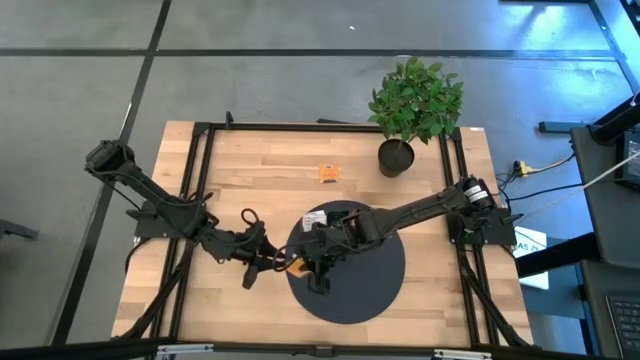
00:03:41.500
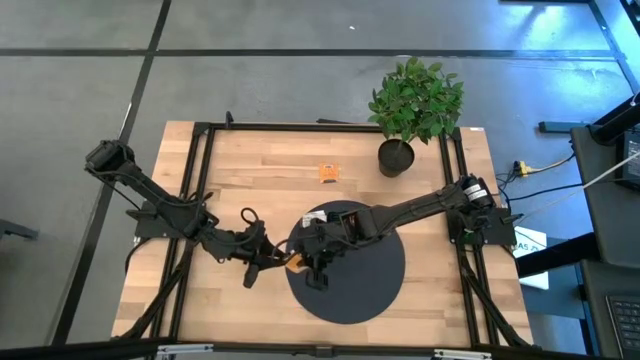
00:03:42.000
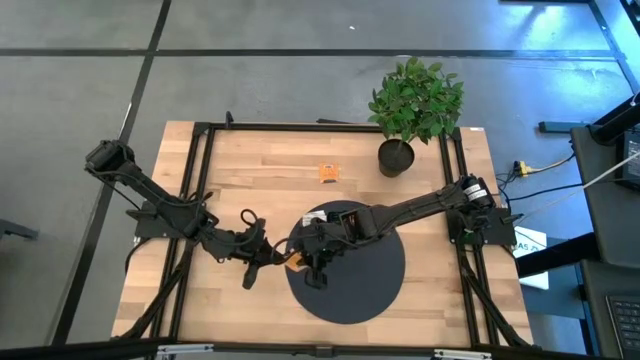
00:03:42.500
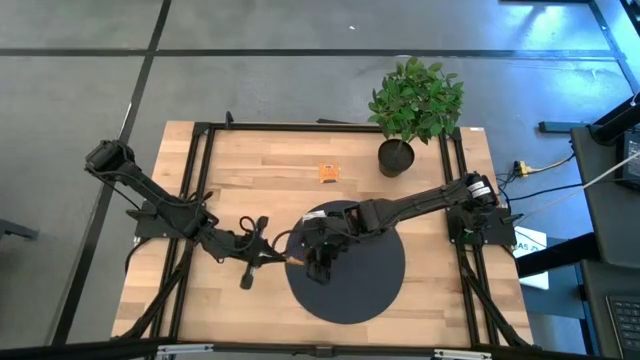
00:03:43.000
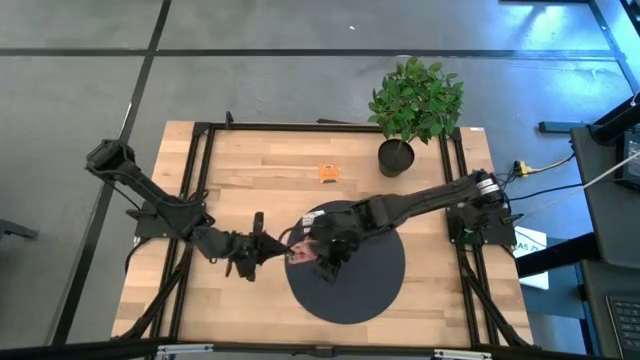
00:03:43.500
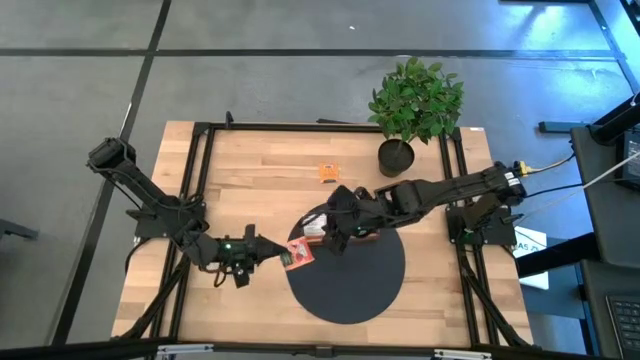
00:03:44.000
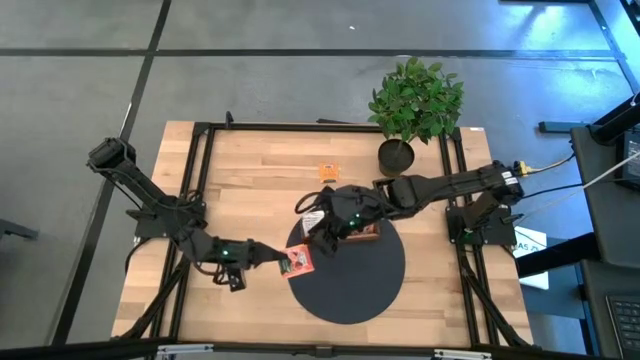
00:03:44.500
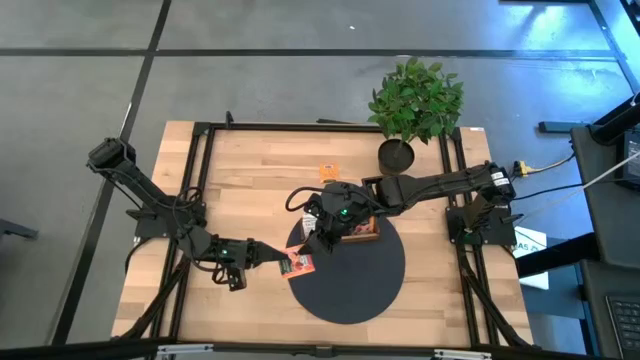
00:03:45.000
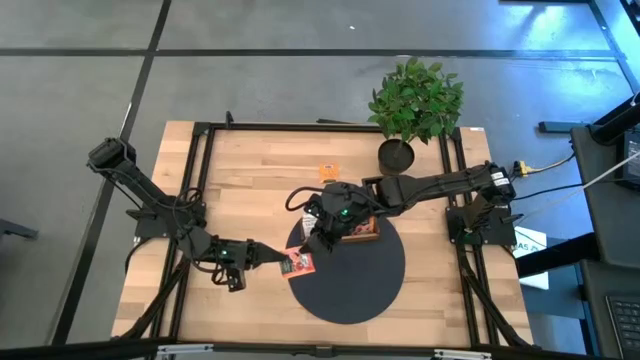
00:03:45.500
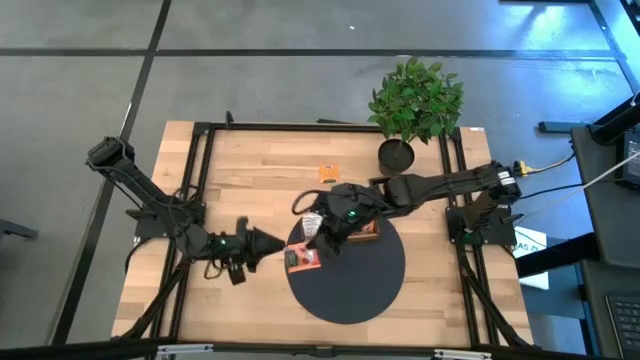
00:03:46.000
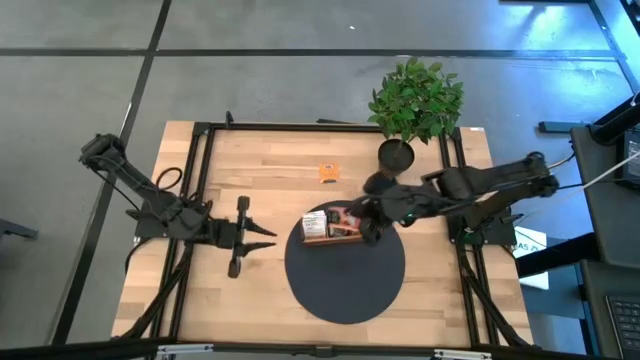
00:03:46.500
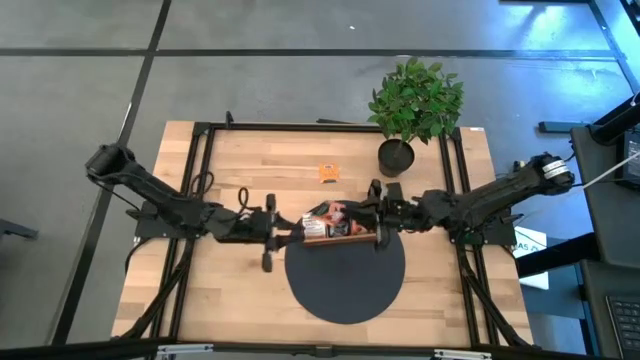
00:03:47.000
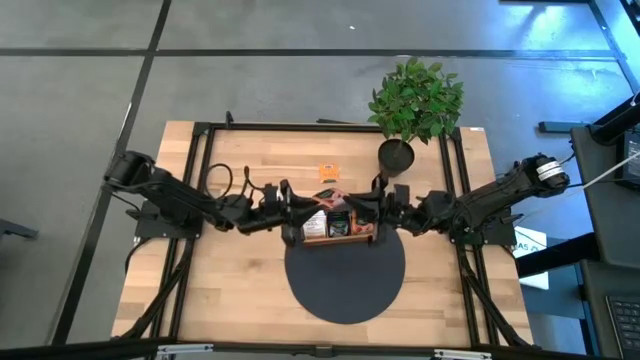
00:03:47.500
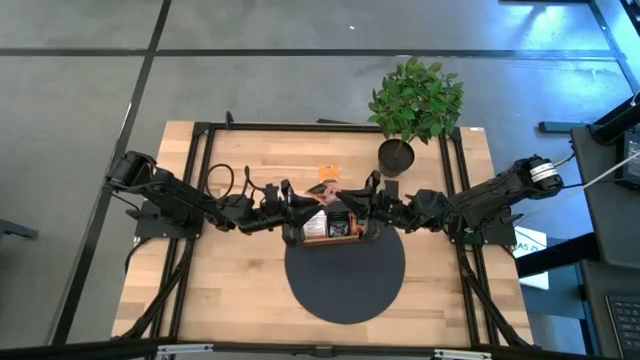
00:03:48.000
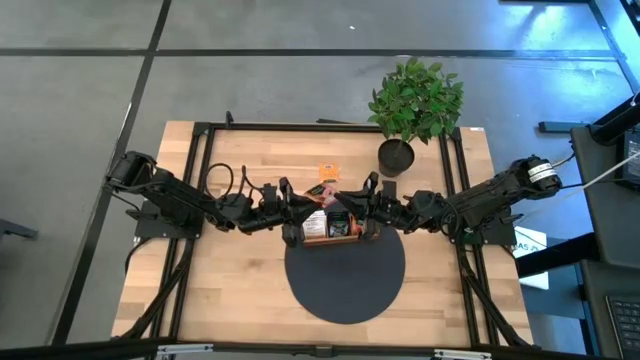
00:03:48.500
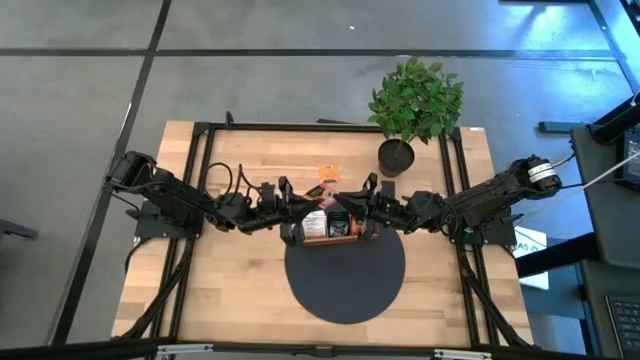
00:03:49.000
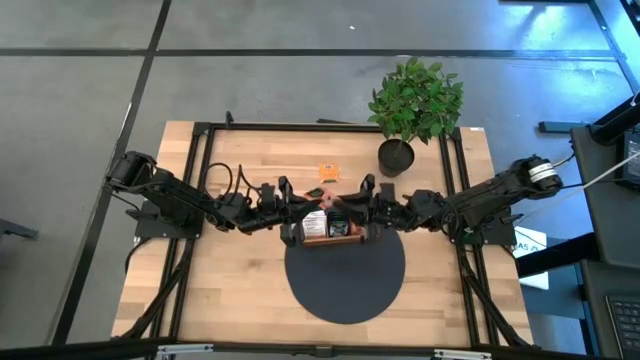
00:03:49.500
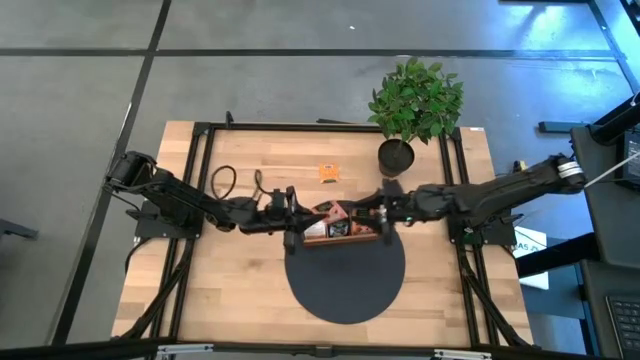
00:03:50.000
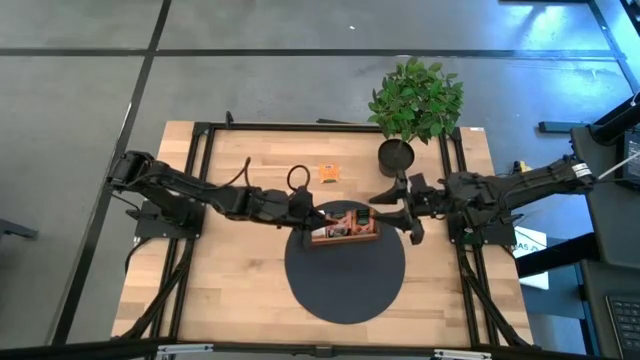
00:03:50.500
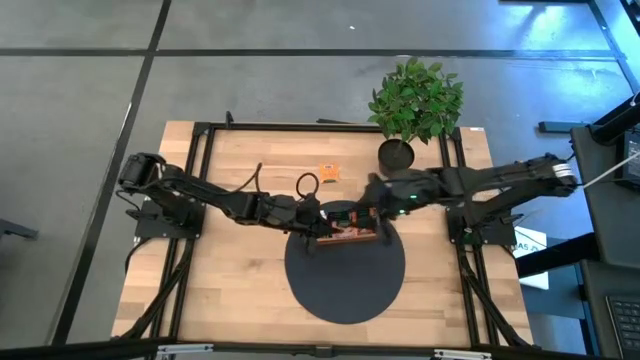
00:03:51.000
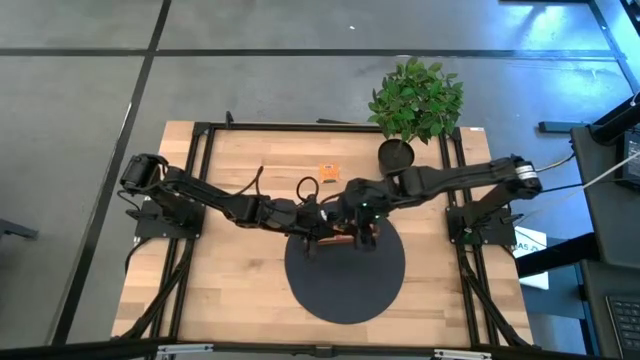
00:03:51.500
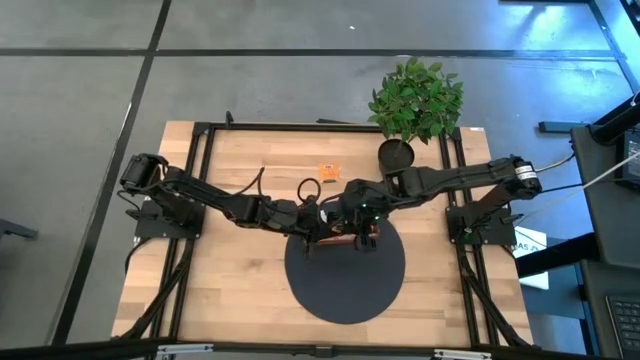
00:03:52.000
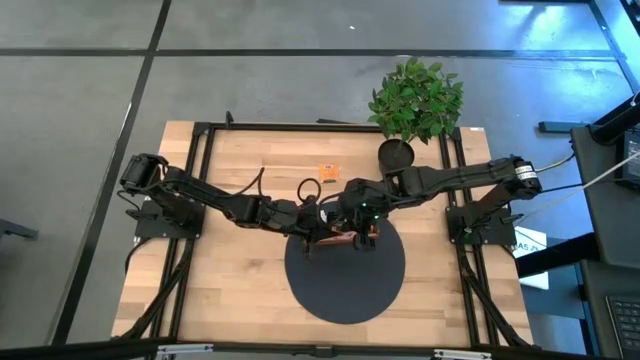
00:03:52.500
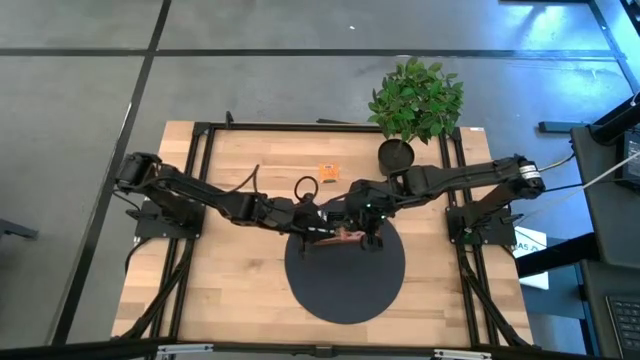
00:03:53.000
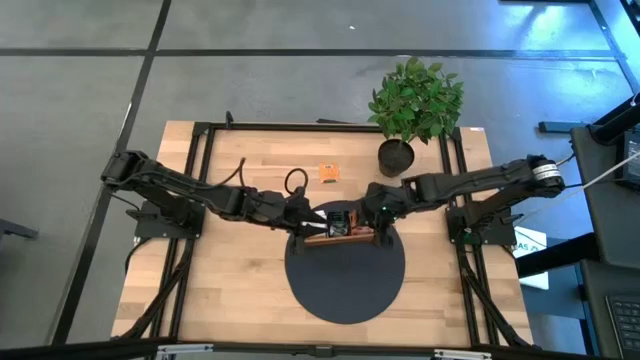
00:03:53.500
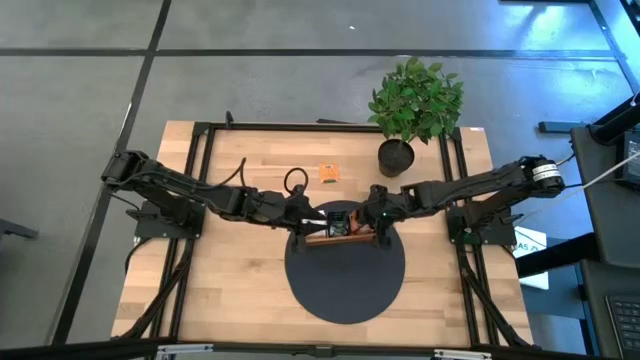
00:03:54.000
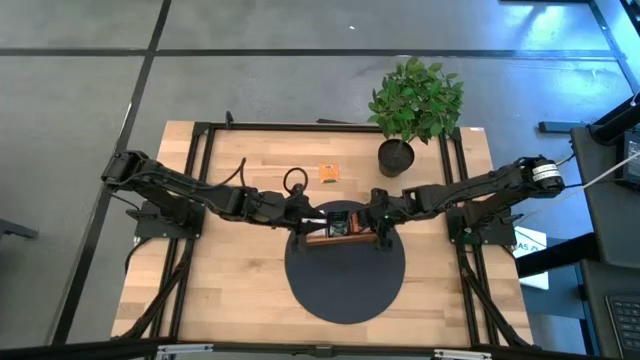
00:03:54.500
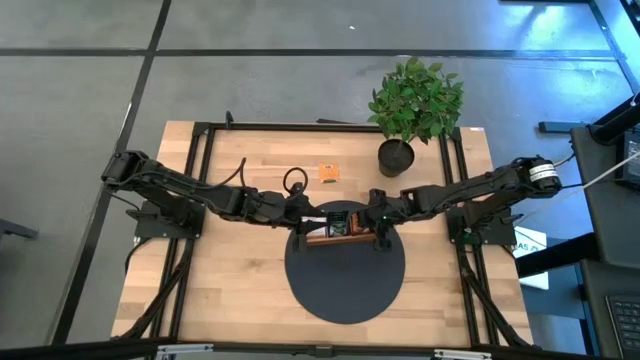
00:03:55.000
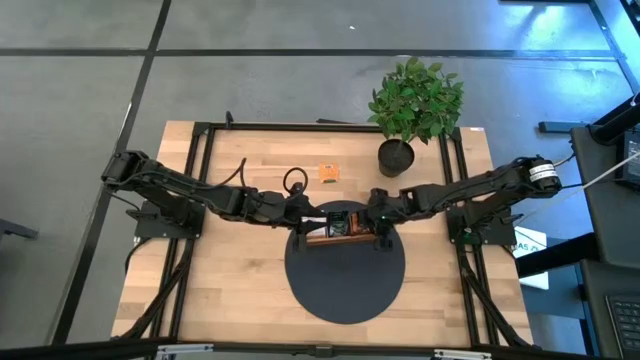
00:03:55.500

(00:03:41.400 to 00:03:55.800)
Task: Pick & Place Tea
Put the orange tea bag into the right section of the wooden organizer

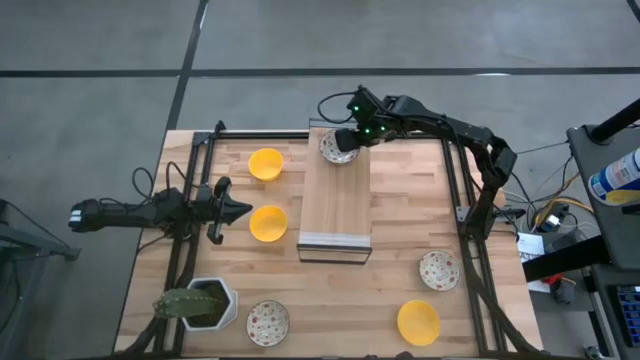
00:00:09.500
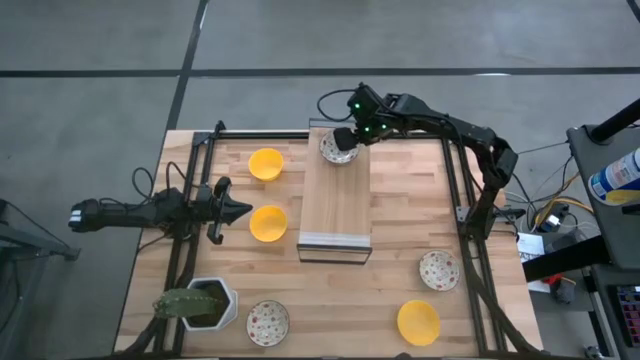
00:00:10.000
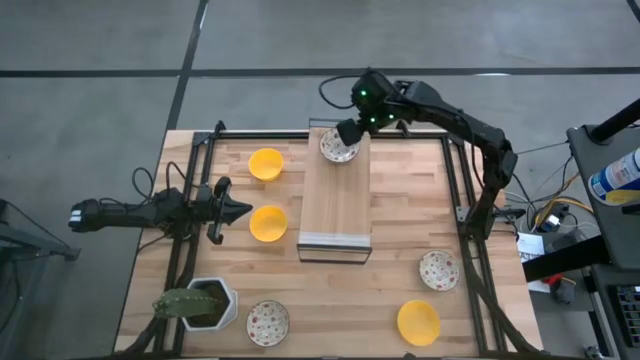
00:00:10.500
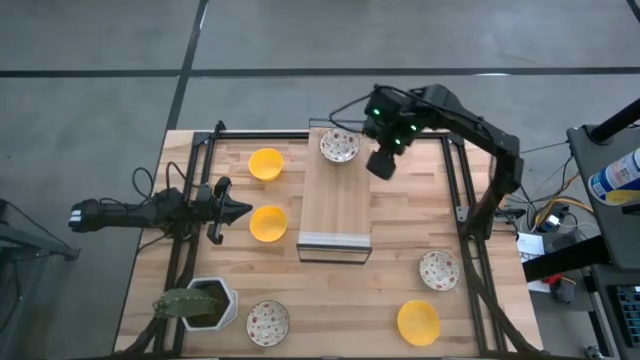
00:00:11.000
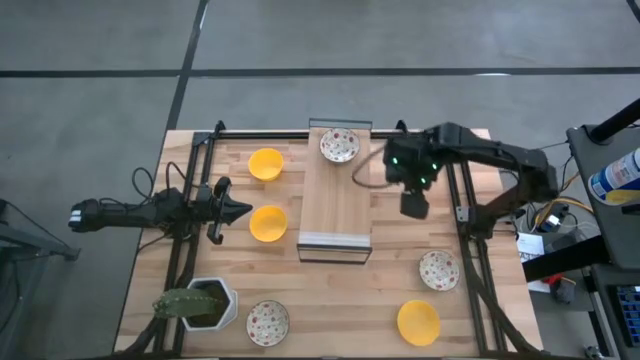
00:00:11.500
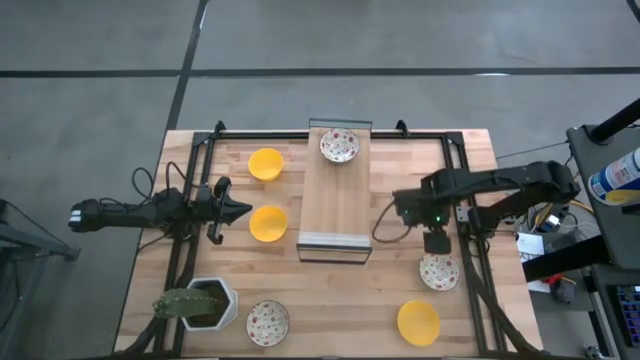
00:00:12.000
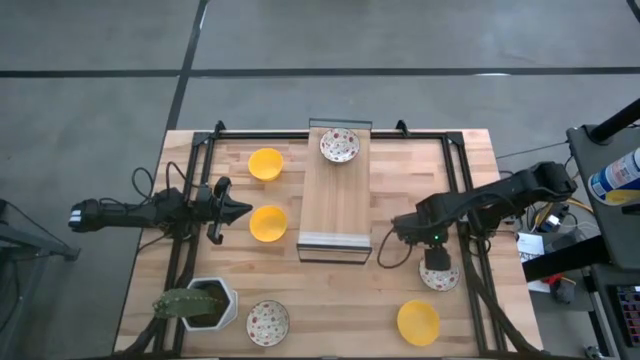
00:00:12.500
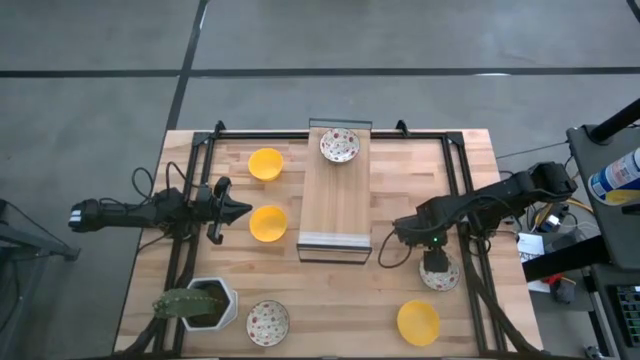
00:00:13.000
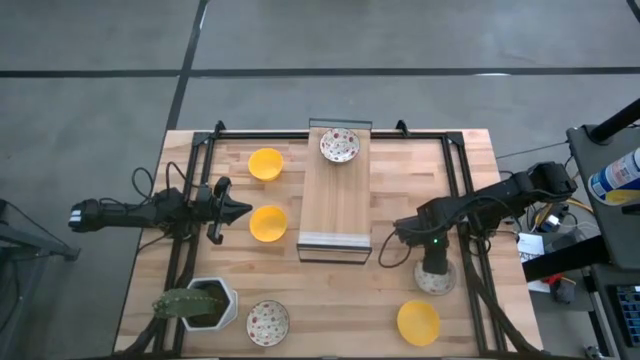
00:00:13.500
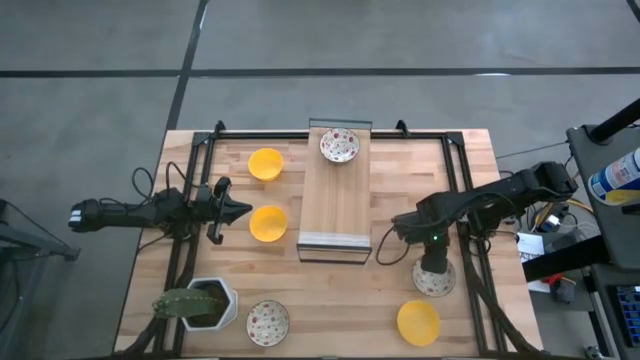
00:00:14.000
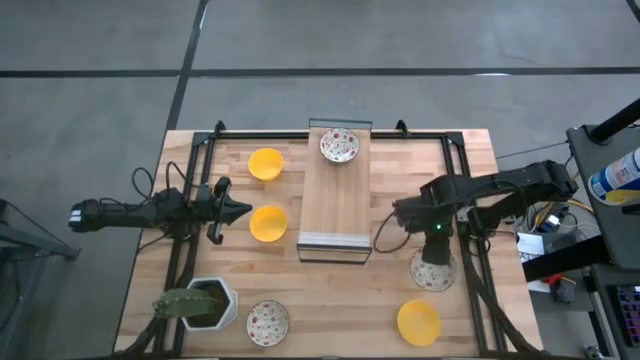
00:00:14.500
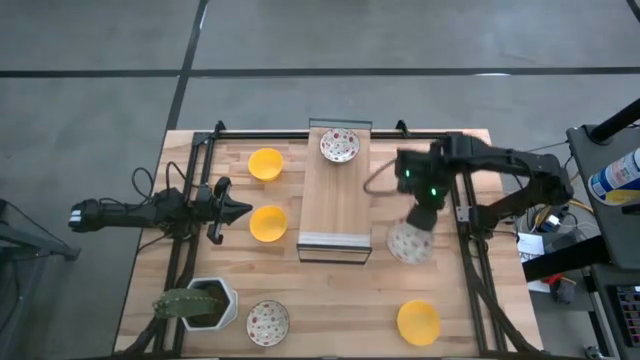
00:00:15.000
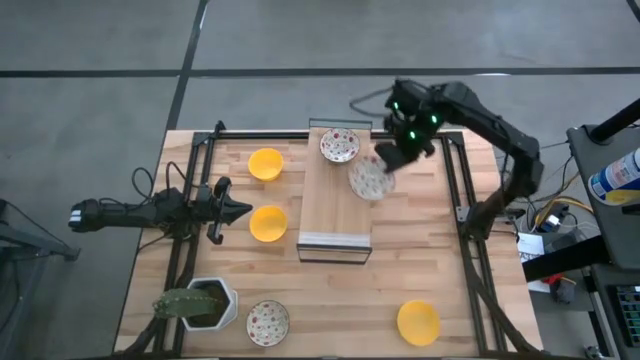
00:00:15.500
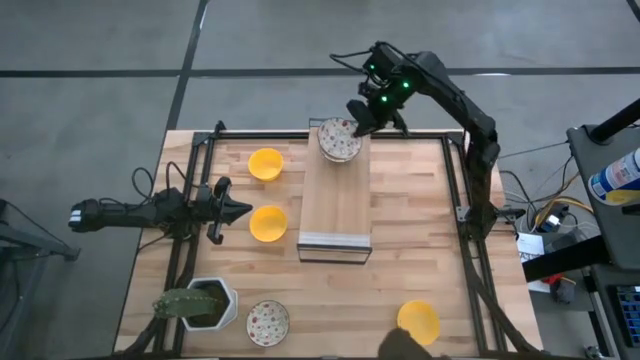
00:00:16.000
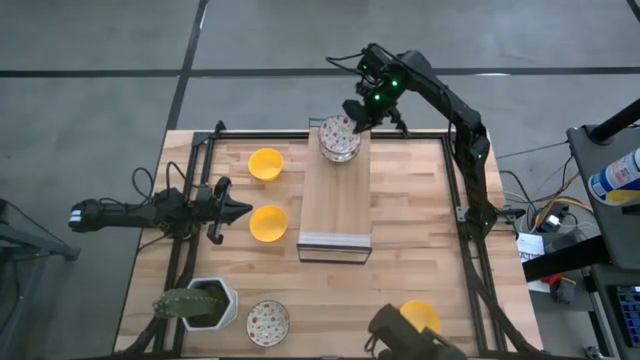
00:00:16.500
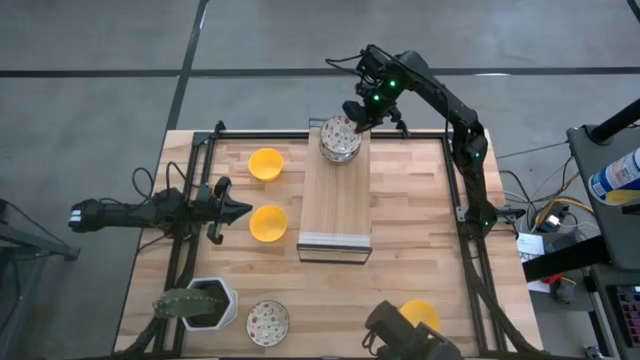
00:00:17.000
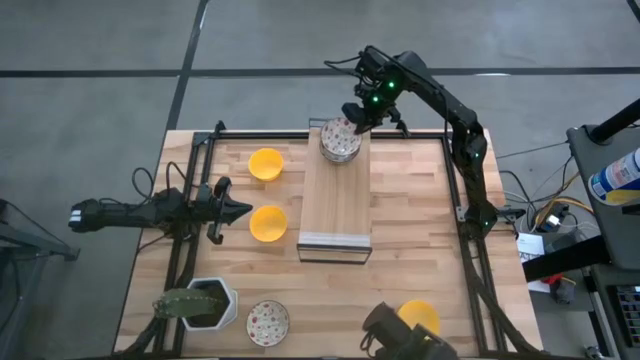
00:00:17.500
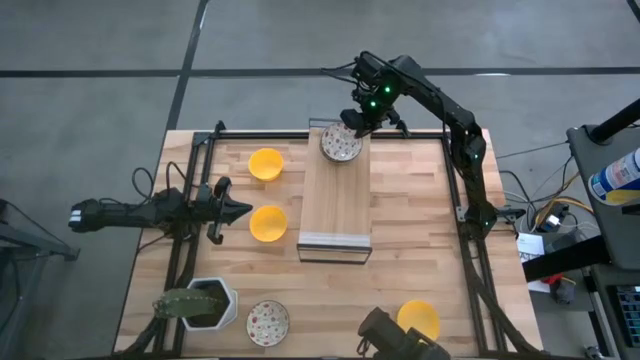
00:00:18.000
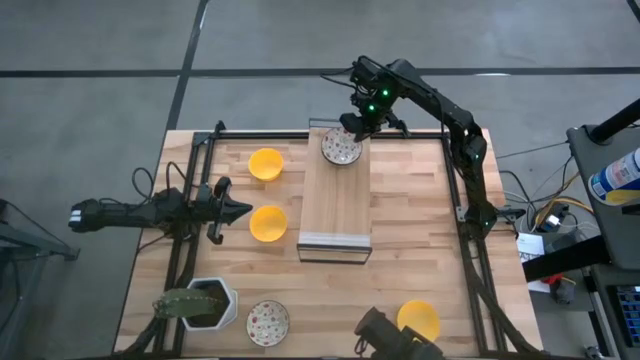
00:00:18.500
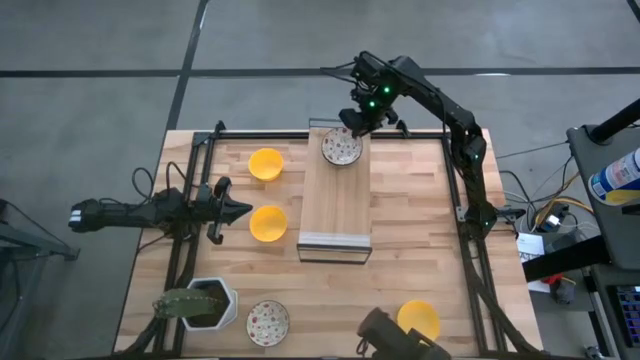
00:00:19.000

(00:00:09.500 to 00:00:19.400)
Task: Pick & Place Mini bowls
Stack the right white patterned bowl on the white patterned bowl on the shelf
